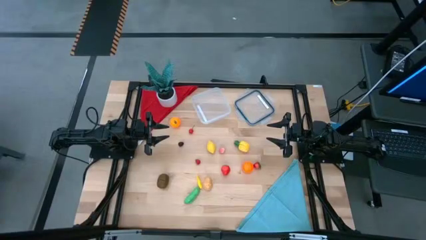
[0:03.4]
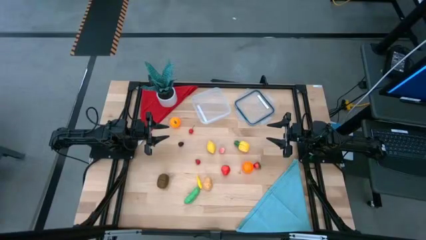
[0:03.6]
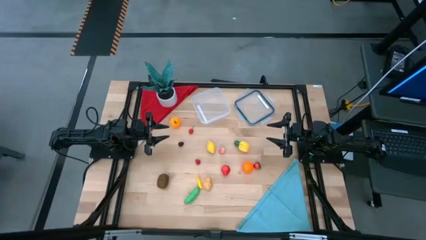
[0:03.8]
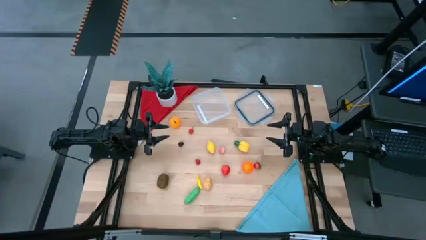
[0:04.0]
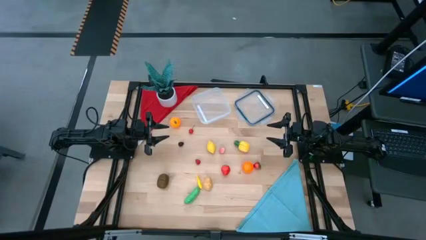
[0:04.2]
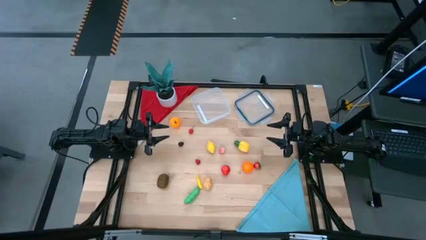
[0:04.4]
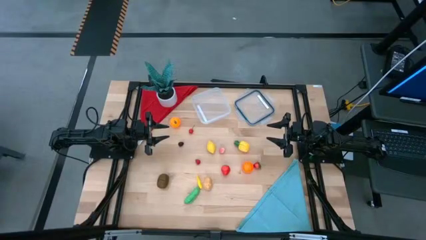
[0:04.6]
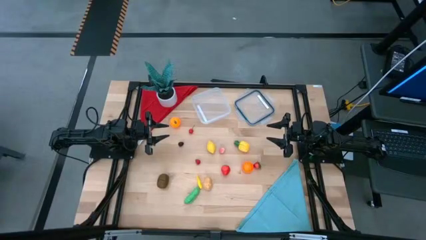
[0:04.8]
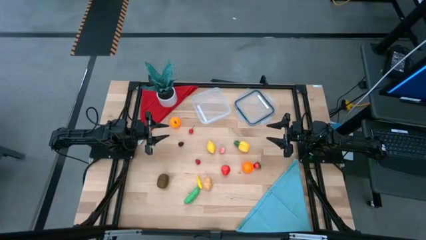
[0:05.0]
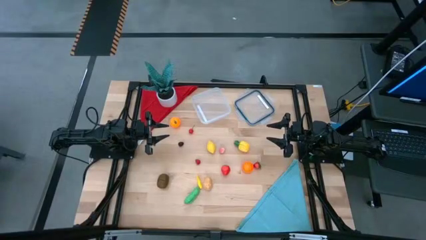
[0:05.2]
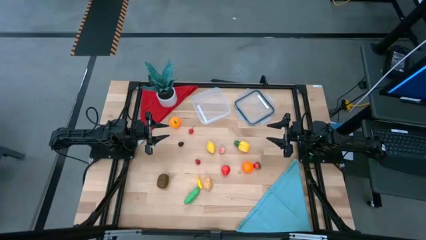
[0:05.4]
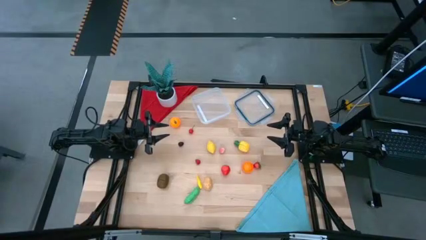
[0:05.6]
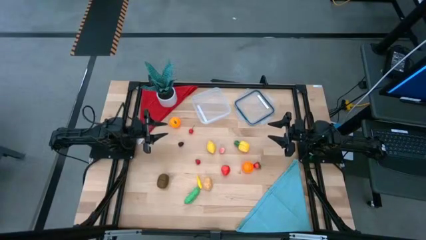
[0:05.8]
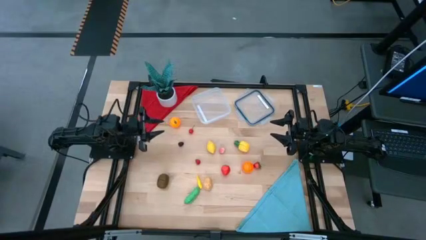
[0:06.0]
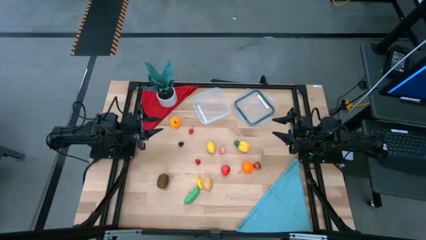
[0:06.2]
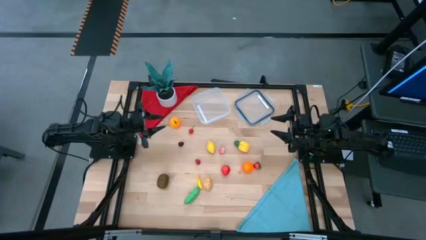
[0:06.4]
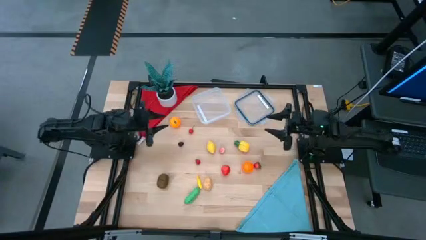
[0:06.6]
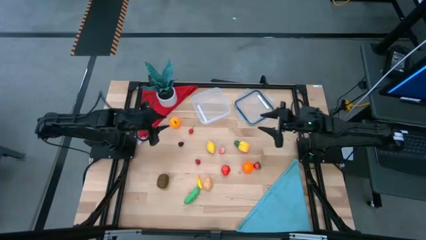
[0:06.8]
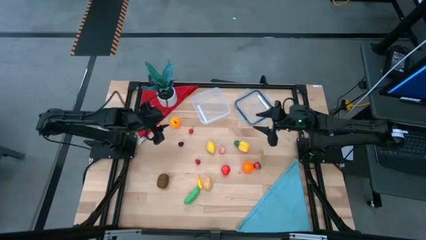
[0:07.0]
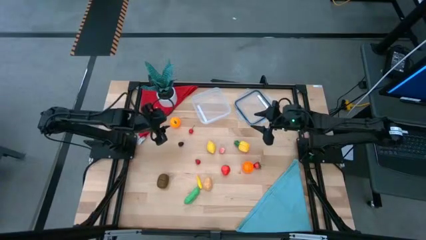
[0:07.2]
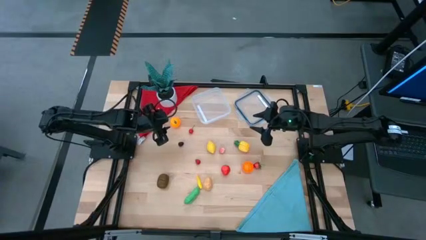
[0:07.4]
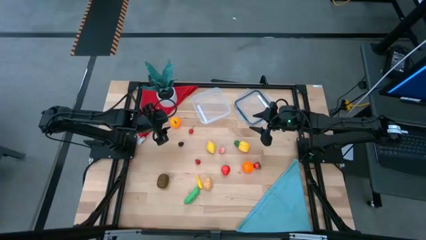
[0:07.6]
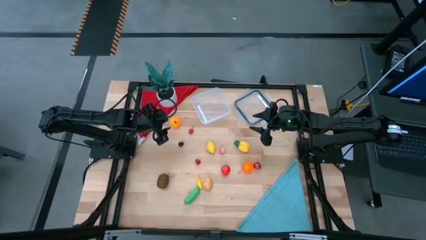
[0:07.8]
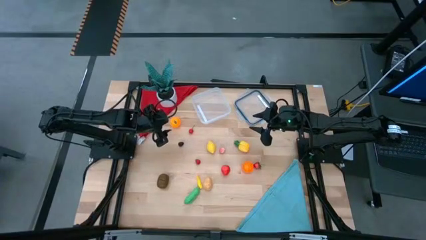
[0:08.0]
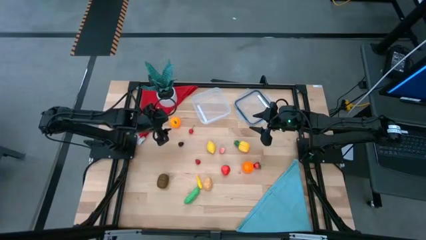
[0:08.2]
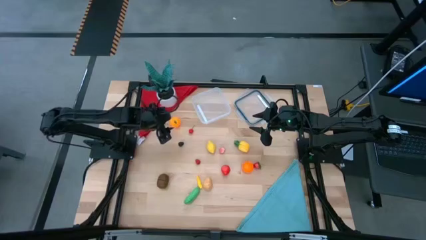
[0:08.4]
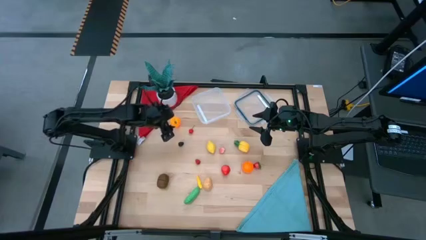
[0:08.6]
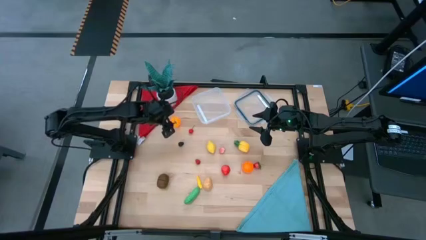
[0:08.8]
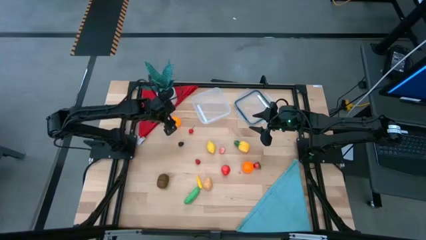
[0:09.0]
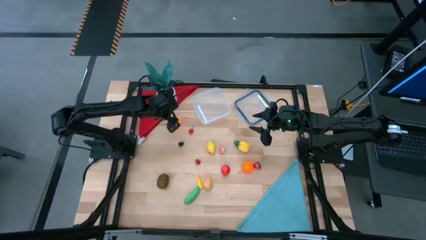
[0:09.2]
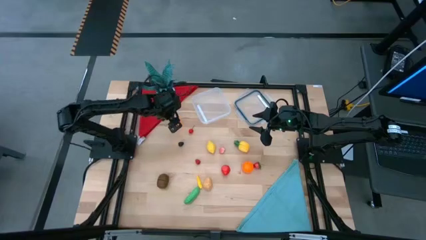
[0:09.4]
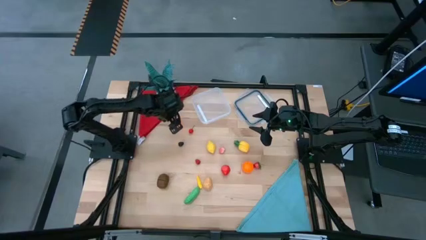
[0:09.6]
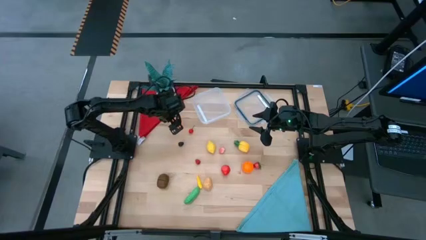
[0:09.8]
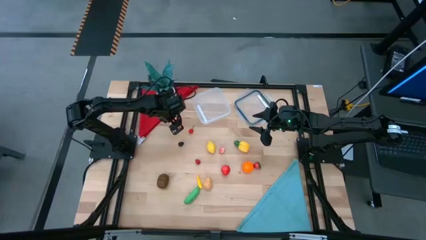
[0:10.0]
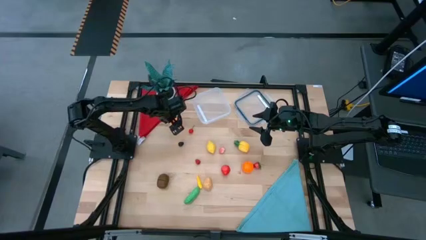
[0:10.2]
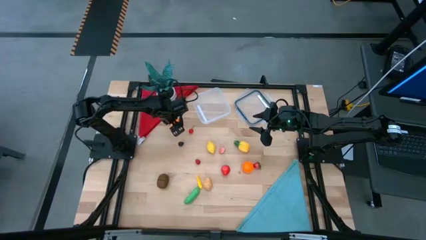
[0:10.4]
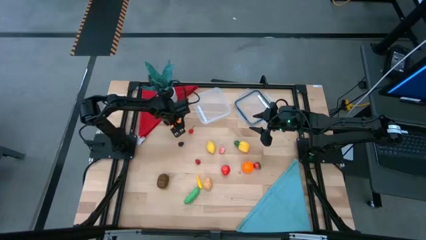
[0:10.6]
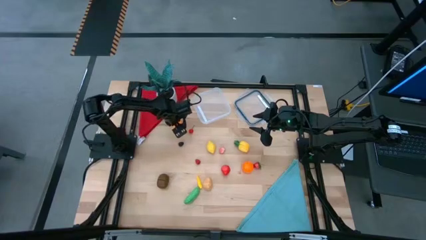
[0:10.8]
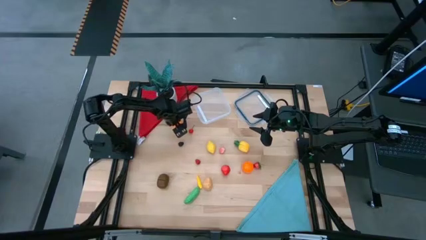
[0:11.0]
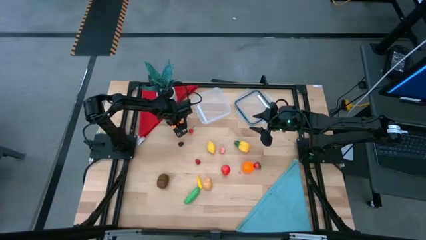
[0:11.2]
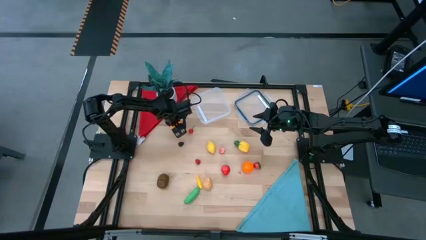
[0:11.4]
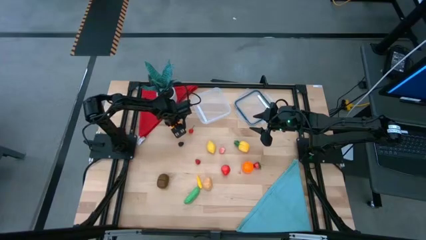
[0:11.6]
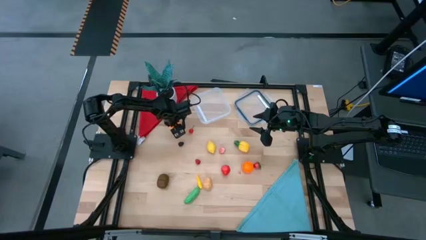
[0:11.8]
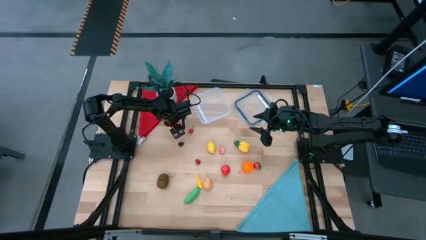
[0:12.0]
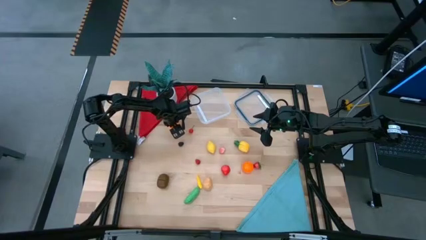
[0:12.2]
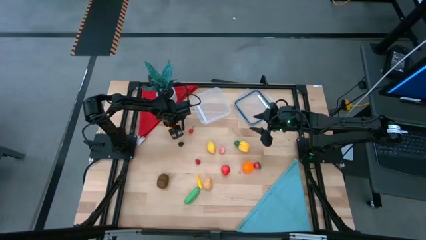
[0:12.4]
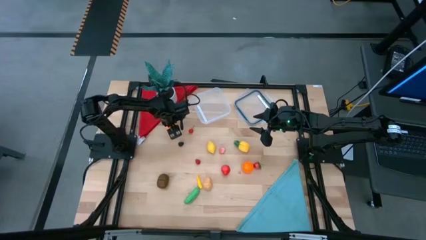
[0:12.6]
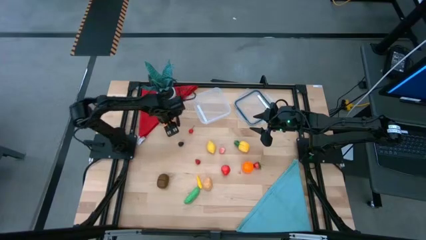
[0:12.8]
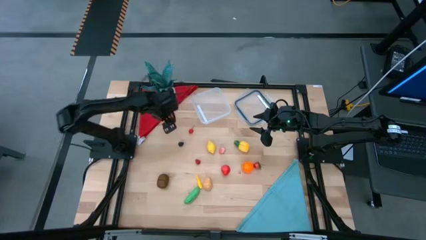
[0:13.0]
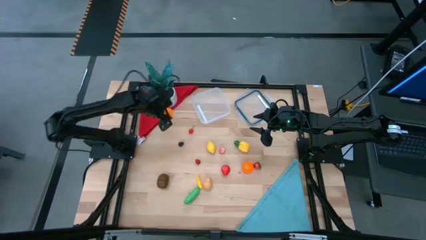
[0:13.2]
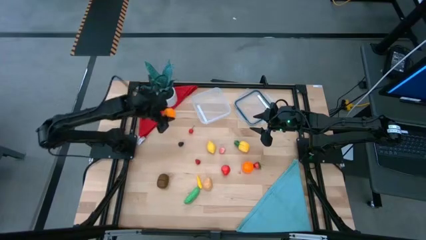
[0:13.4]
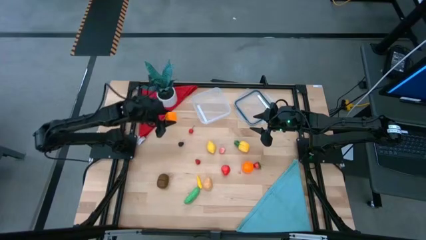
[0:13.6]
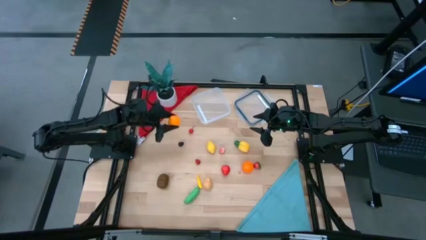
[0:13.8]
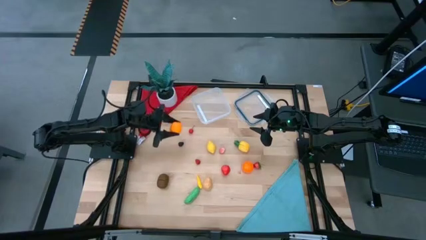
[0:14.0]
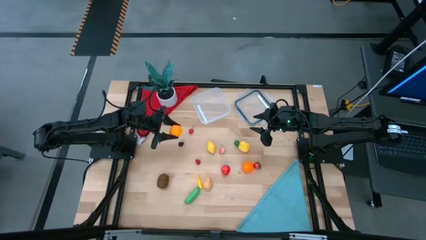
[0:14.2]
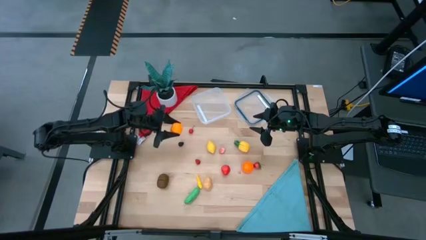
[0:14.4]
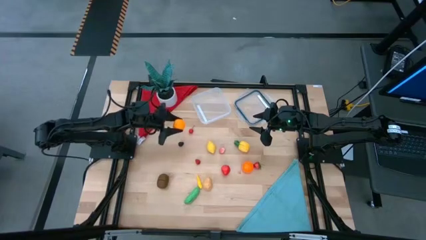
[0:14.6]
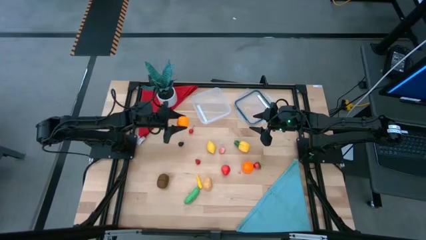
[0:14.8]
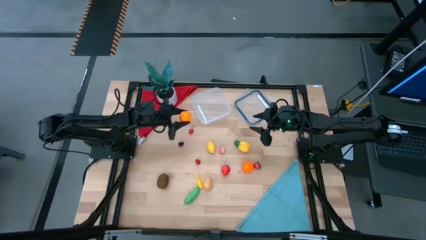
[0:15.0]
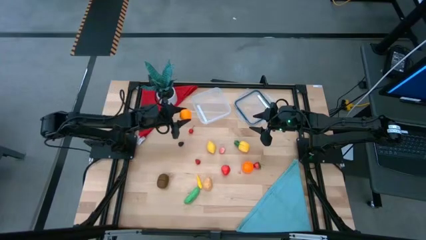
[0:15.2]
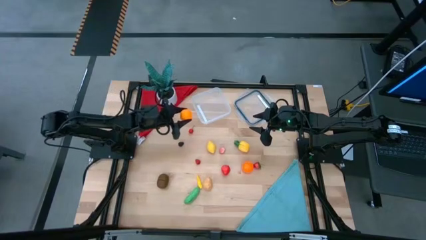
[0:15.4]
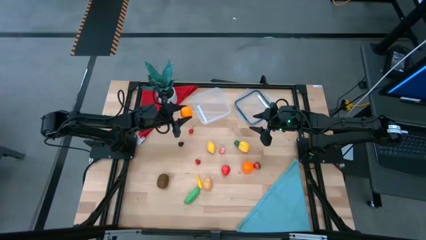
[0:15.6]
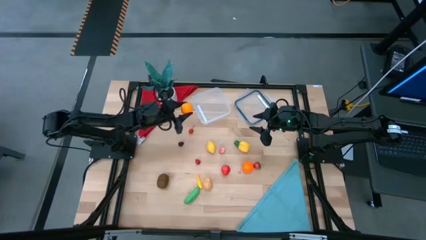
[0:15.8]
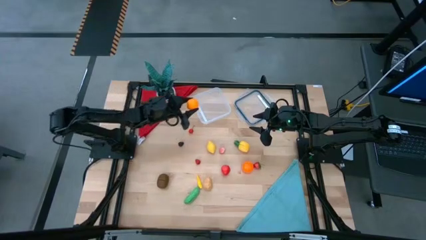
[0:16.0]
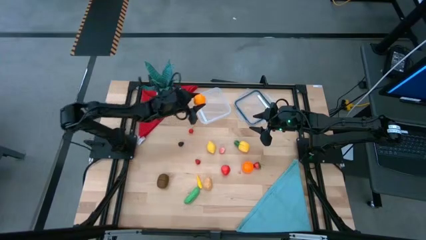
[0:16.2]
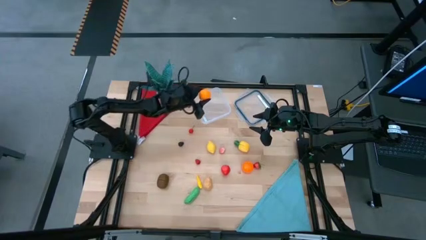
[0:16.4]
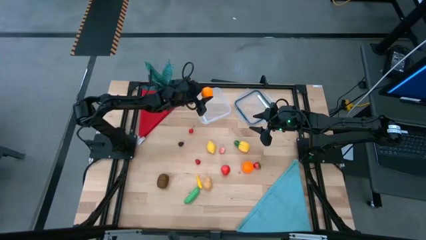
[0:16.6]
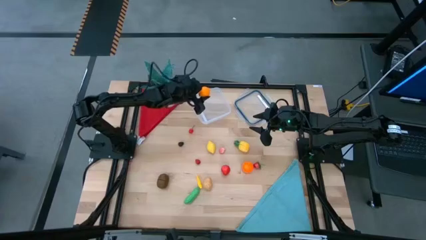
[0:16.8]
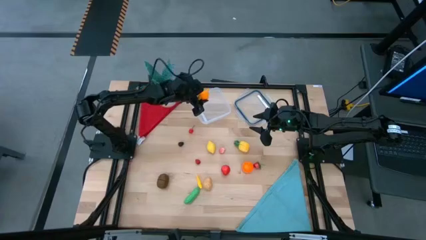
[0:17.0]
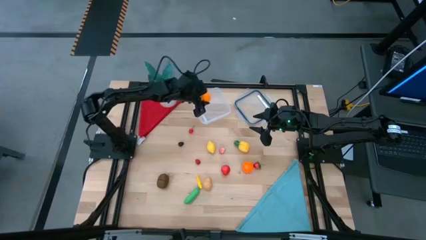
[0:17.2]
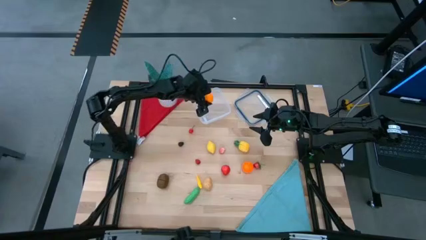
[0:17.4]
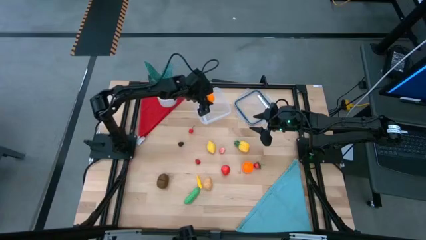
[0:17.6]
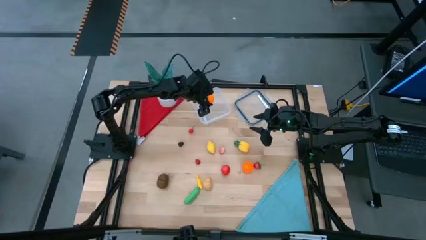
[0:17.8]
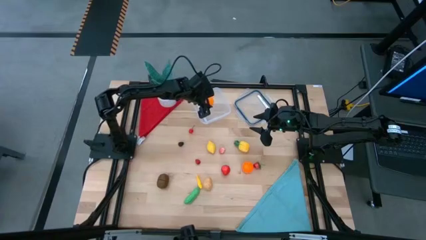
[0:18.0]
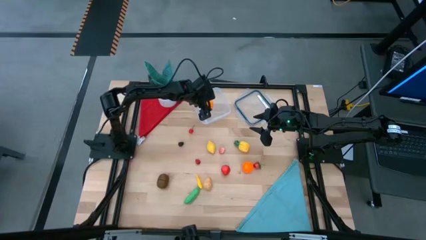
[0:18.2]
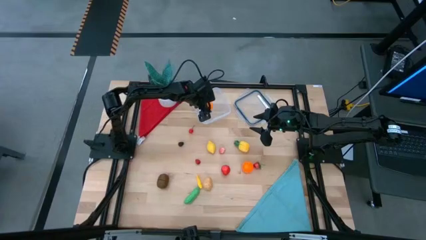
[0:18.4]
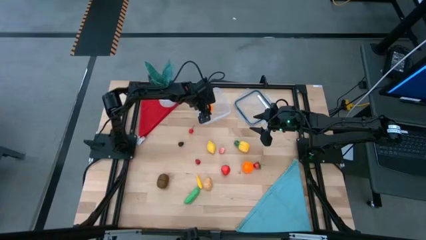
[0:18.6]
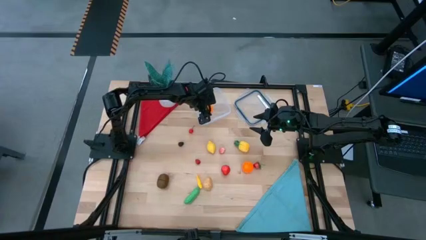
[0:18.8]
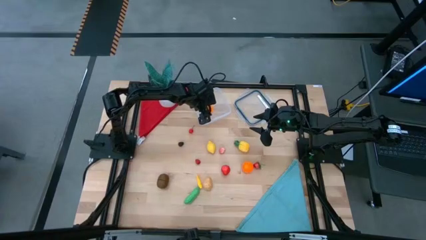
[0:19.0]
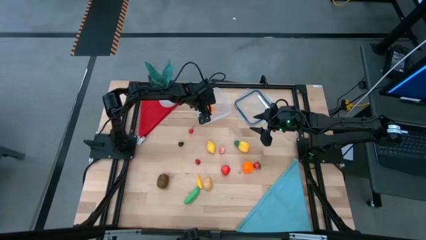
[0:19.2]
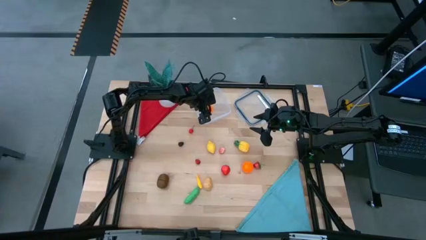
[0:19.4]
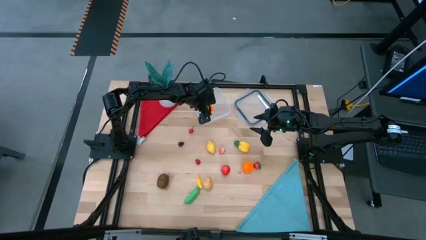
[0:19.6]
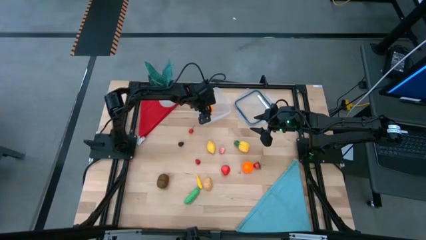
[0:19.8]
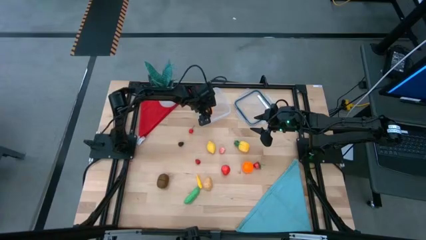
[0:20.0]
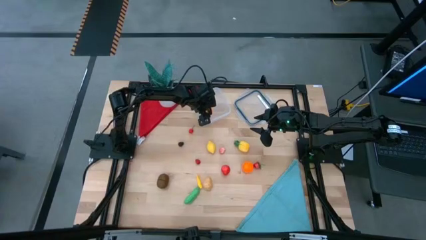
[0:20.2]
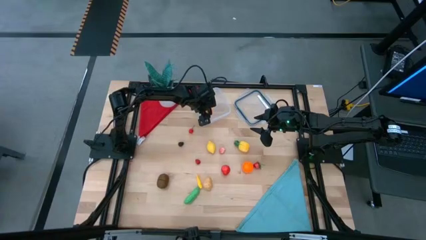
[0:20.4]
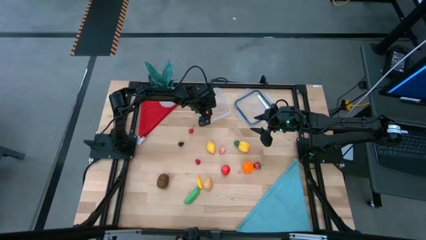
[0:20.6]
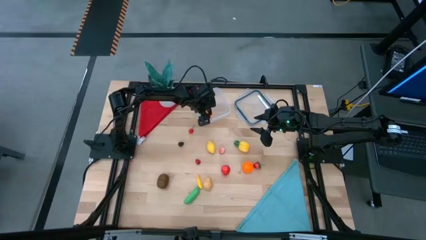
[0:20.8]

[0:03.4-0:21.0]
Task: Pick and placing Produce into tupperware
Put the orange into the transparent container
